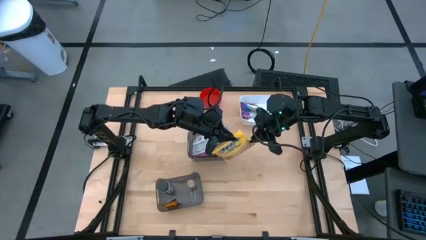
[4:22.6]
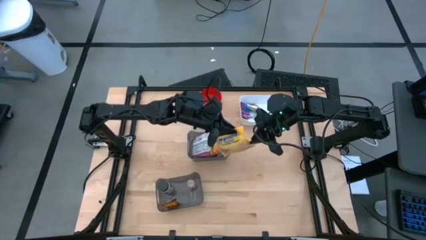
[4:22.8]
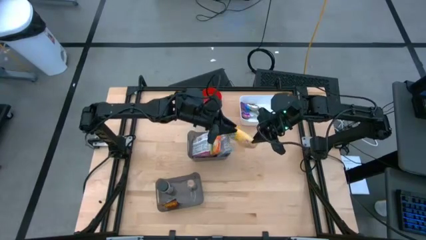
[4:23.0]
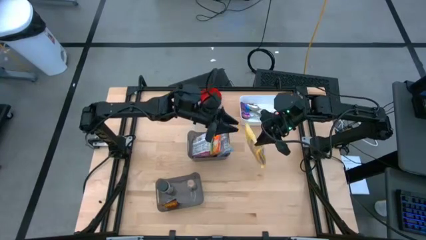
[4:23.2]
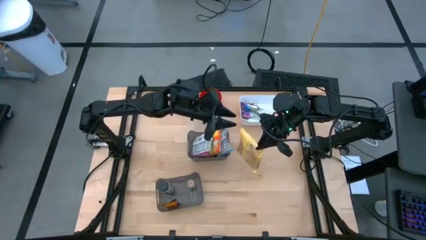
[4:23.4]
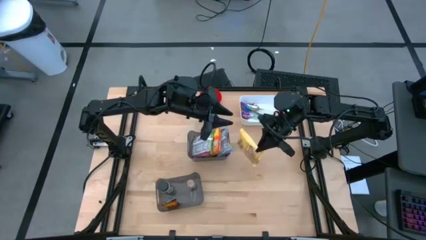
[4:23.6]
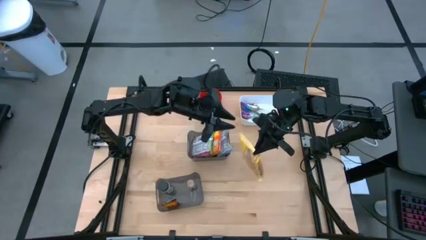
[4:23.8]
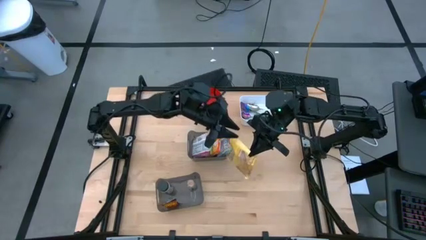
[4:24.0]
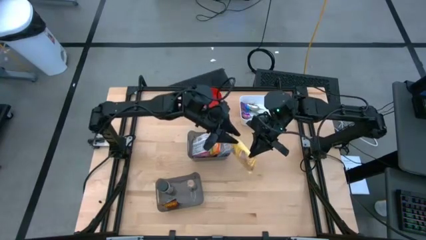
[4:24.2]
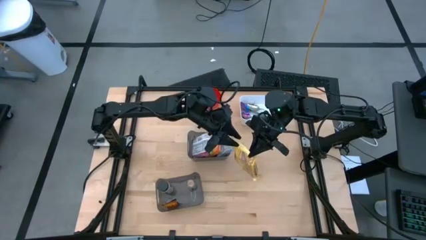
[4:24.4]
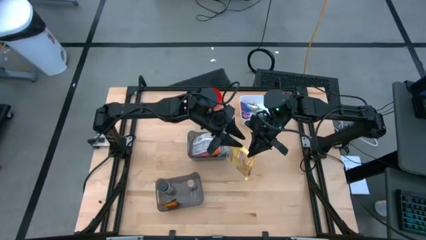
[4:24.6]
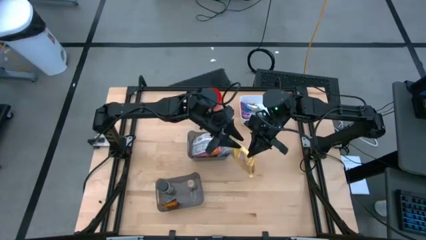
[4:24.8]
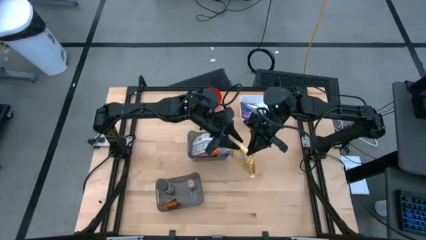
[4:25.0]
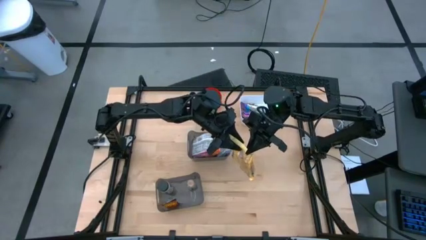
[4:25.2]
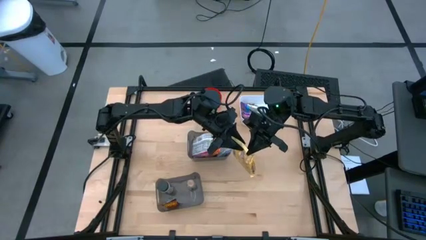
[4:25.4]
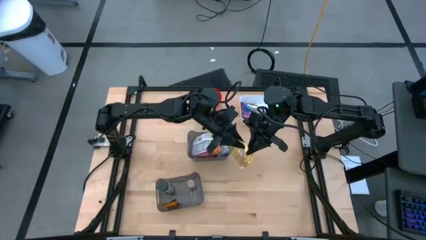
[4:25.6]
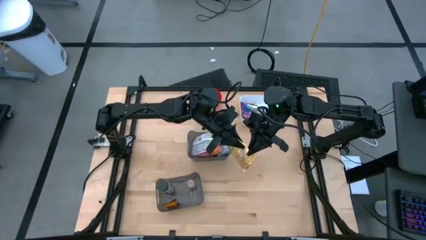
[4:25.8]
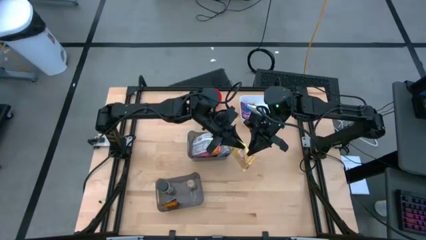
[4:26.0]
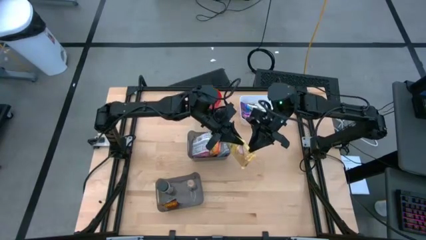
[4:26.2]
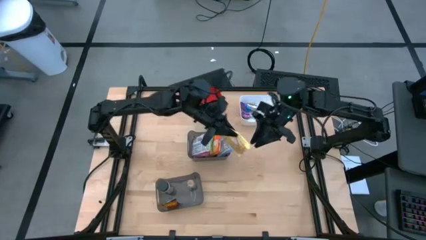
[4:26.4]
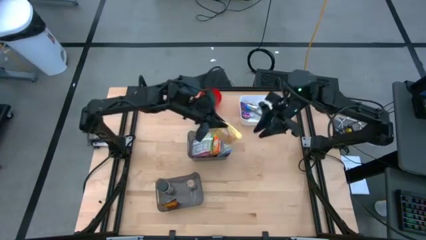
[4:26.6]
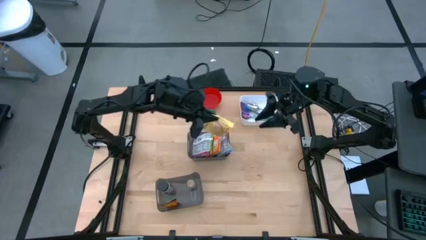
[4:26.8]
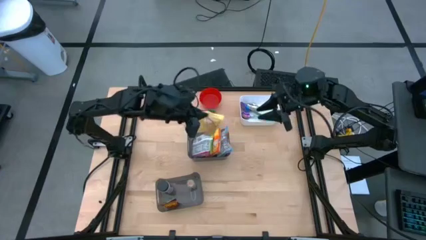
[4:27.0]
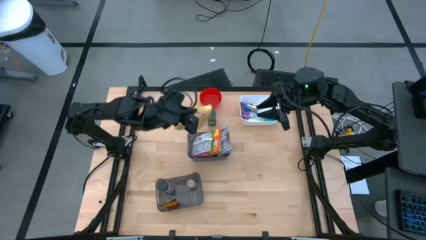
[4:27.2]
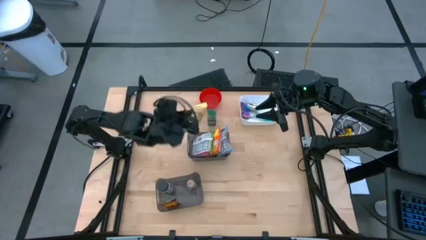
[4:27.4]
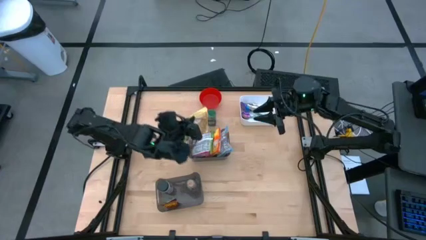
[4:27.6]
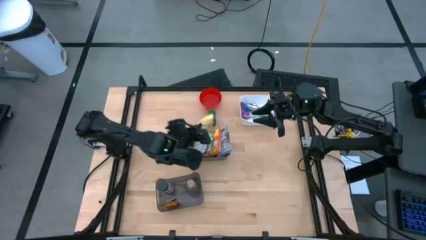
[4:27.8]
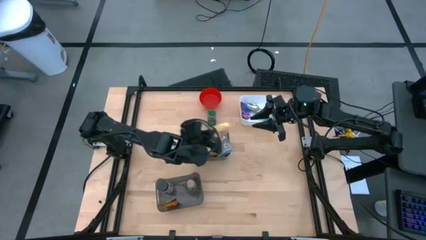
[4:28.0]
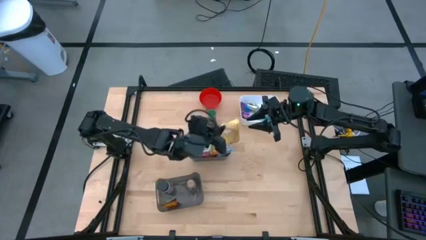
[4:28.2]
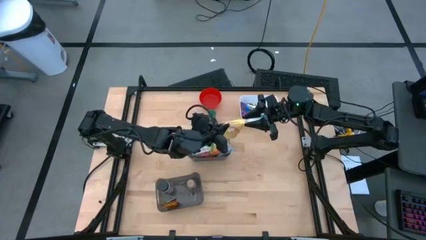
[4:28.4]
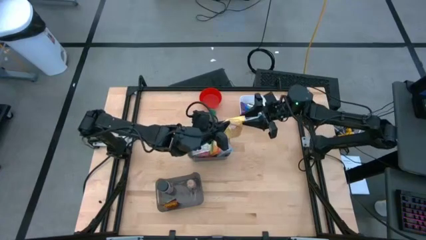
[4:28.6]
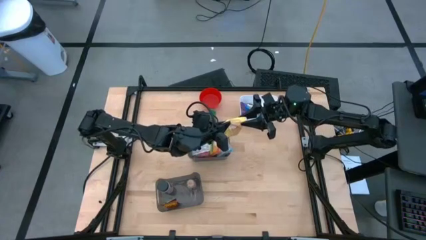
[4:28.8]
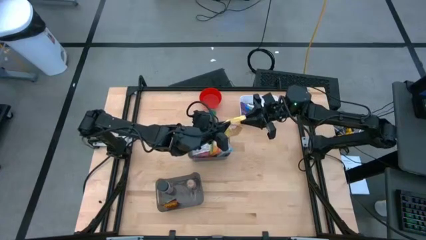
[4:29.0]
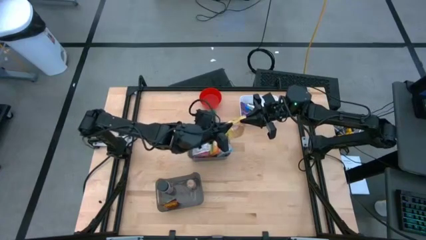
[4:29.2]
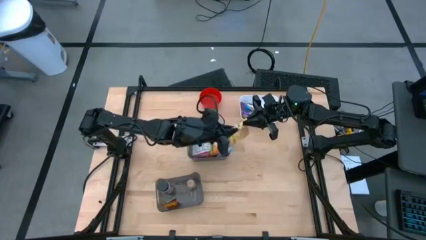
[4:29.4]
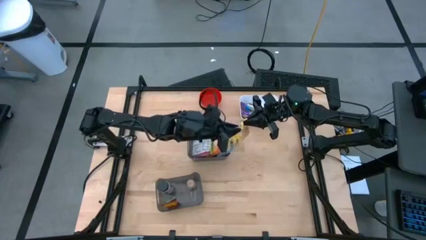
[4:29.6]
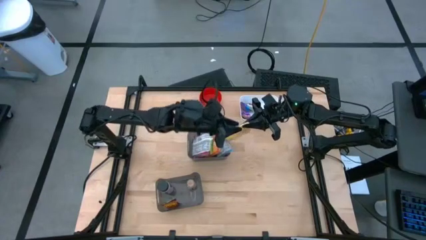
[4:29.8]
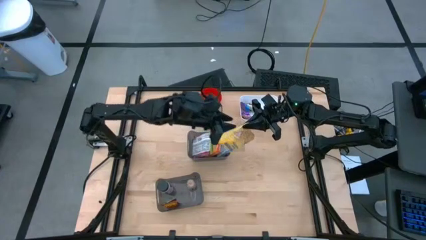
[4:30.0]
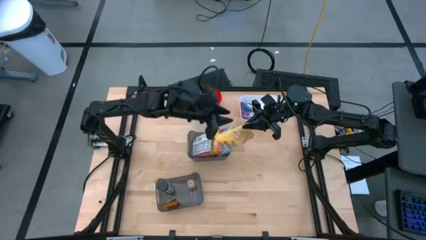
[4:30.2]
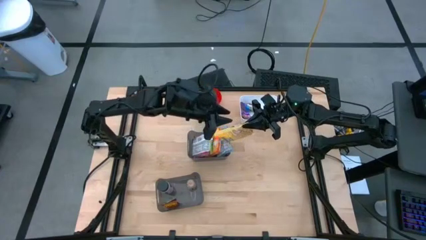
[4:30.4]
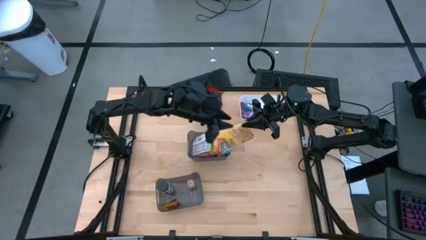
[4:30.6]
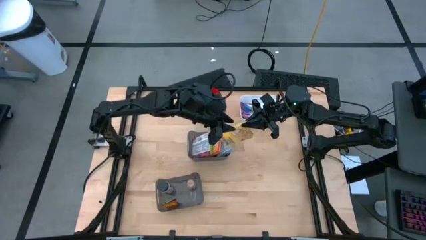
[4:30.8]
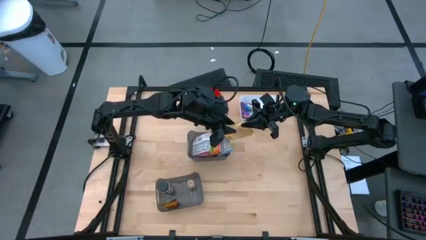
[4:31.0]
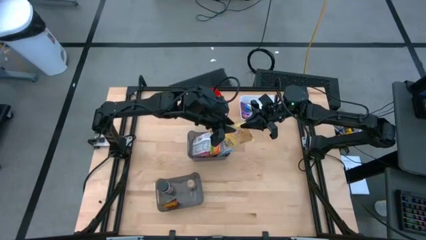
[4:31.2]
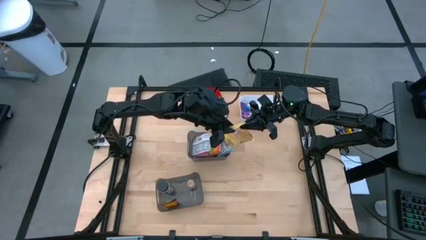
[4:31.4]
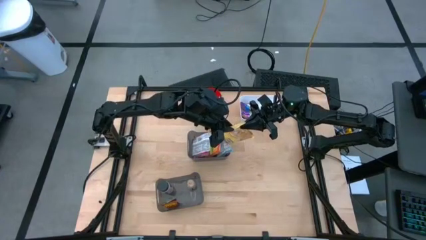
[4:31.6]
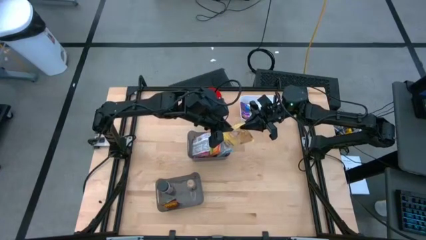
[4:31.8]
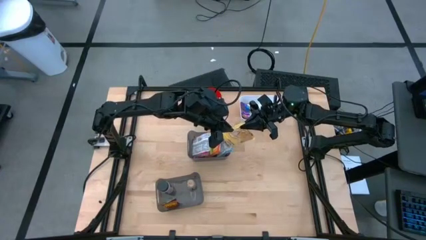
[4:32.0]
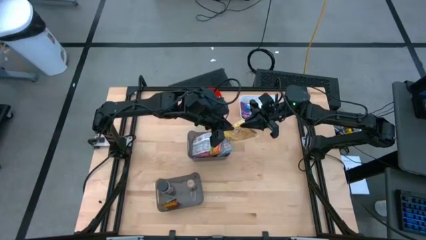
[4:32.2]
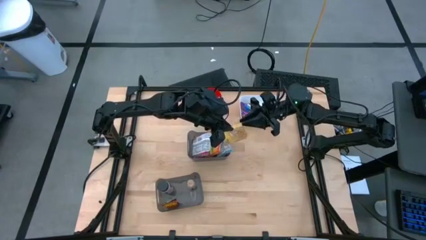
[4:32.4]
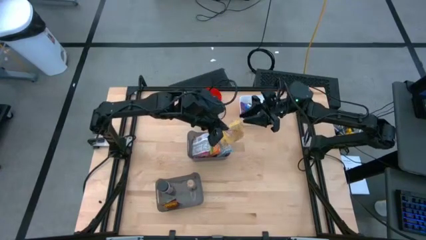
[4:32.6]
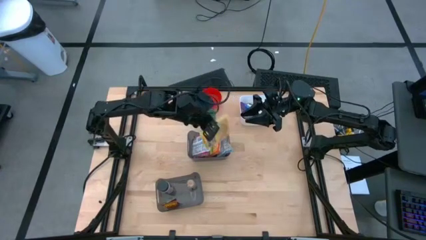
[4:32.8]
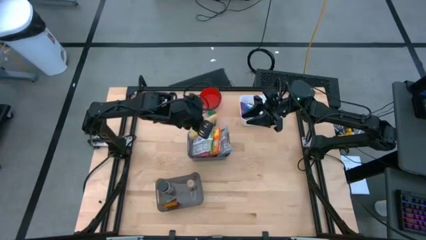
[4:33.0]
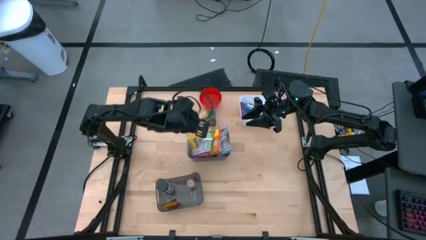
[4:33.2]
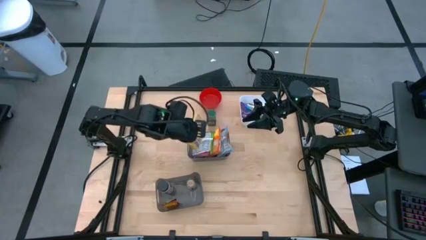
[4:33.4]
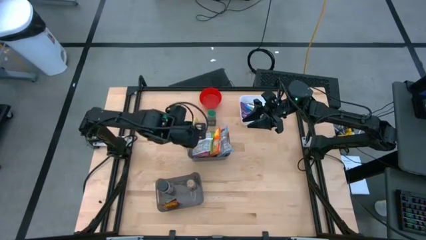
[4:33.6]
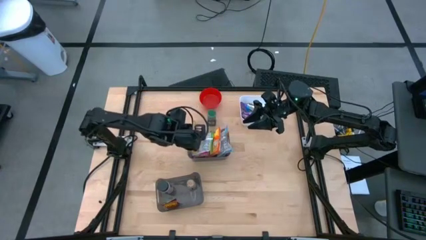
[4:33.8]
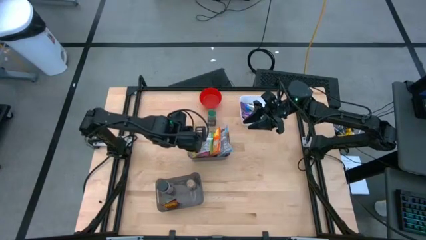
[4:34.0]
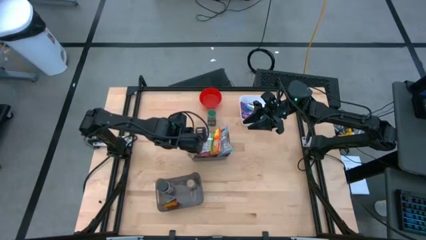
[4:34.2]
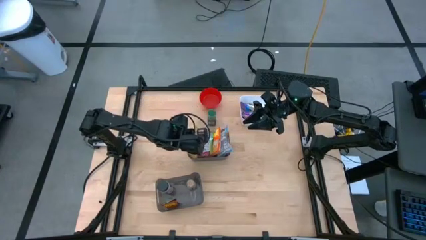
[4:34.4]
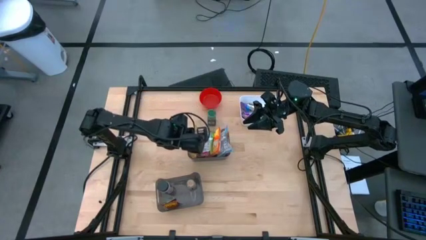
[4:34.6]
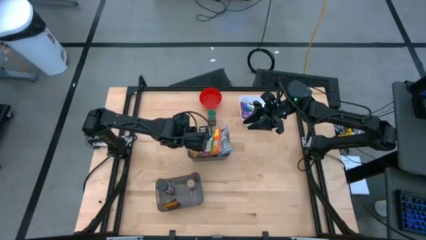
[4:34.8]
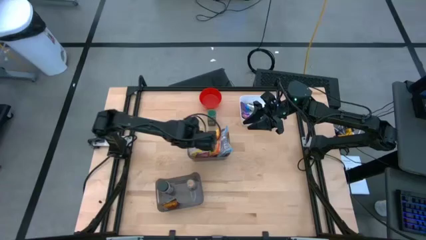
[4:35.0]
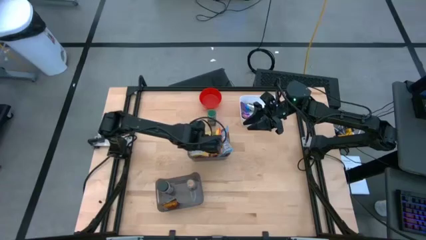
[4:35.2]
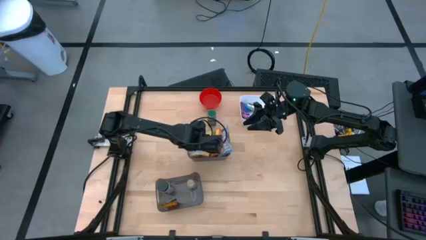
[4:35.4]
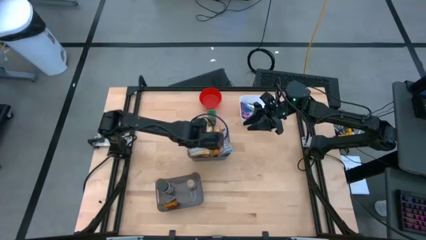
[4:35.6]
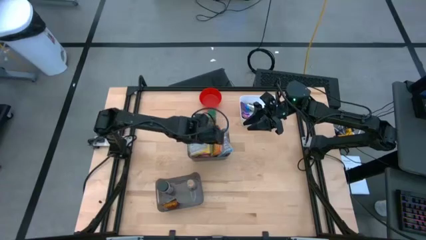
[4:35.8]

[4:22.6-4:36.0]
Task: Pick & Place Food Item
Put the yellow noodle pack into the top black bin

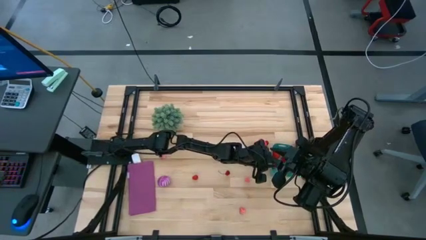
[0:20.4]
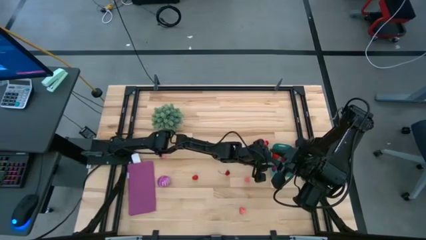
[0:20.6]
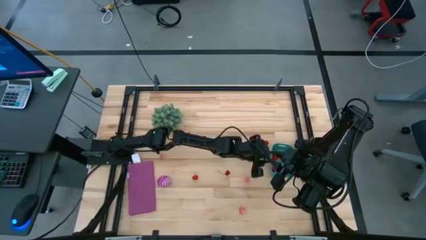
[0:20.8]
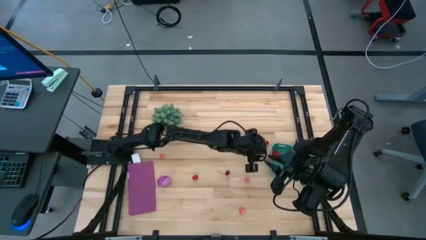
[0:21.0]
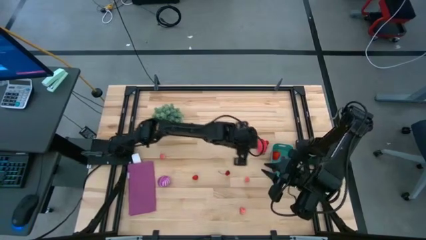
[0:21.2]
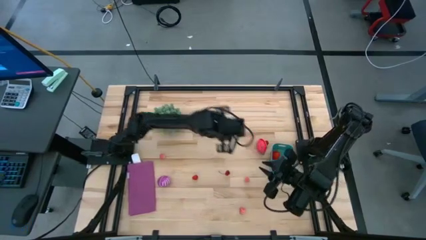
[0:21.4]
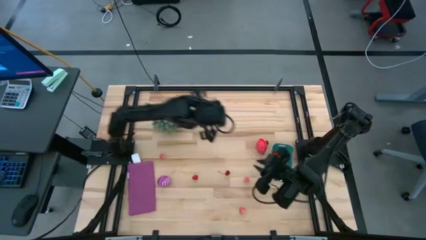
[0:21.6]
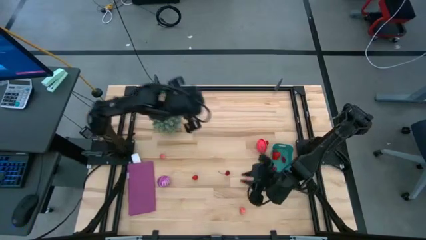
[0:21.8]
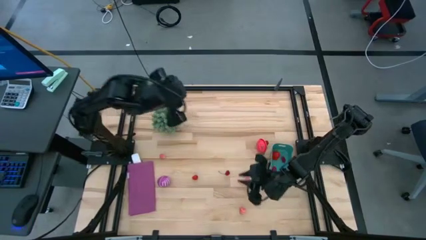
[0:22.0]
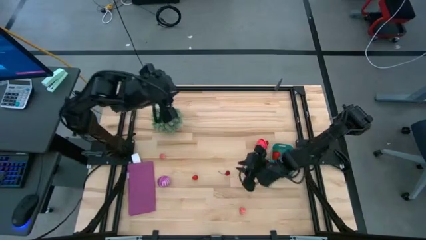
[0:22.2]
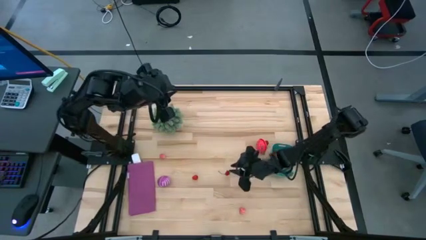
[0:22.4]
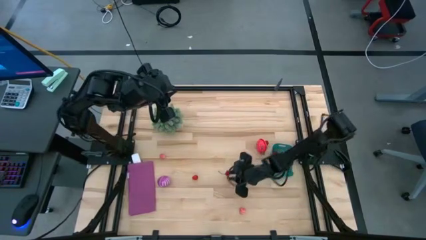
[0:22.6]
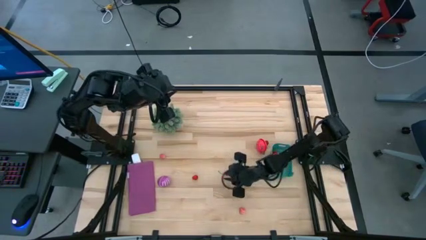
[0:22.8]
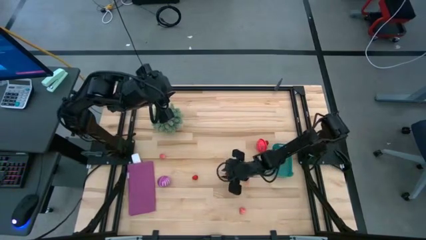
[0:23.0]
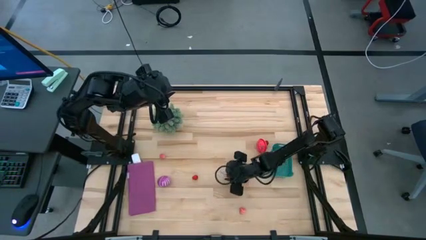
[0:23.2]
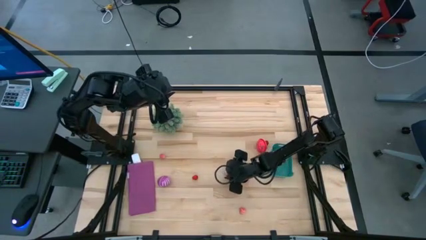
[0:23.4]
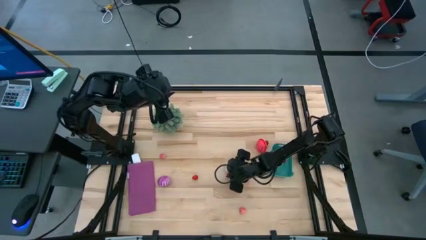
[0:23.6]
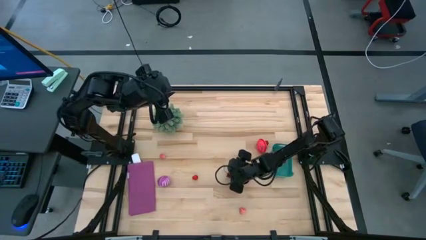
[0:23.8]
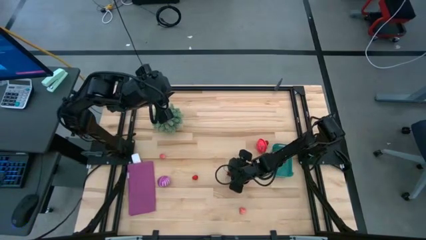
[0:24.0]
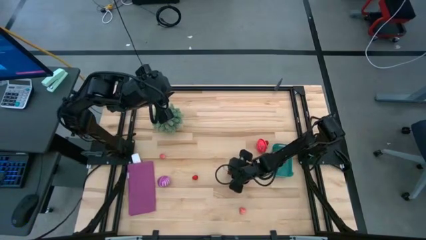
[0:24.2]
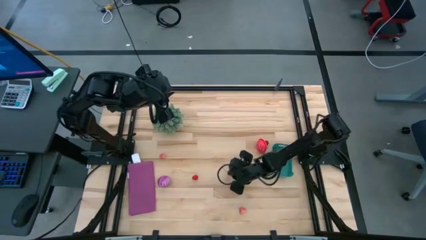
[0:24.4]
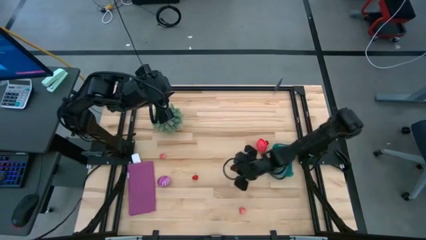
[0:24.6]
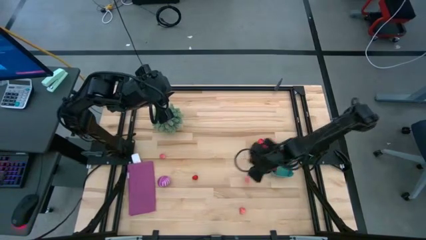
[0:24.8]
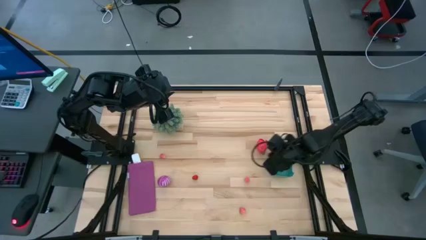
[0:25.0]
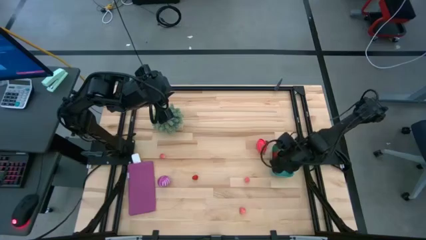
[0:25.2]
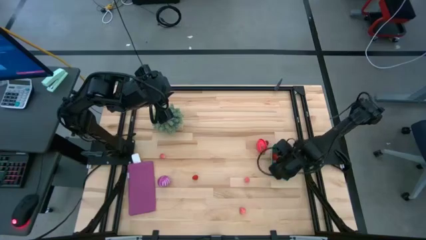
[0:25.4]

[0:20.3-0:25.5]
Task: Pick and placing Produce into tupperware
Put the red cherry into the green bin
